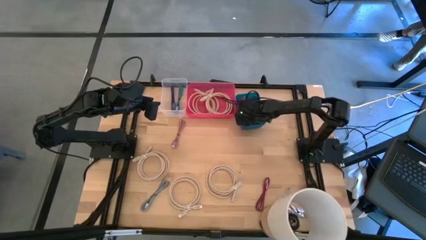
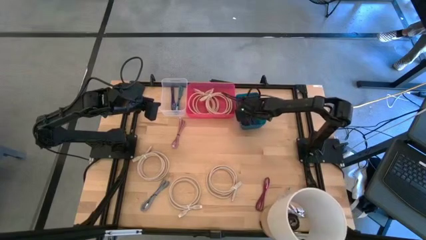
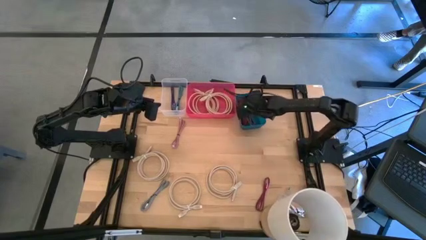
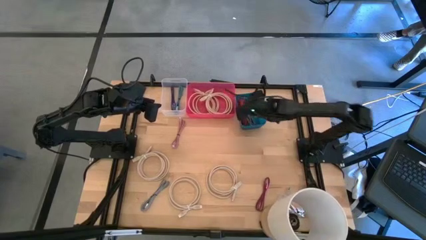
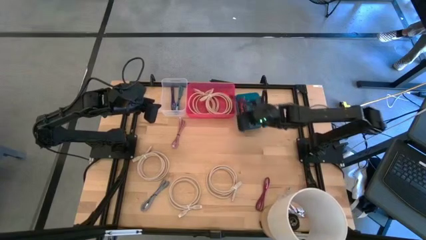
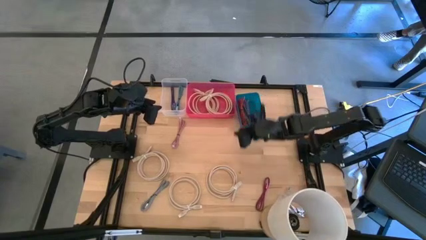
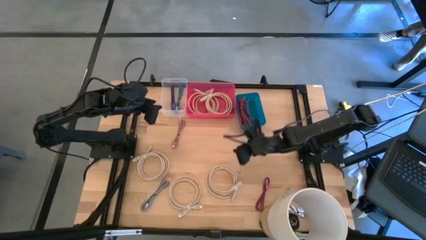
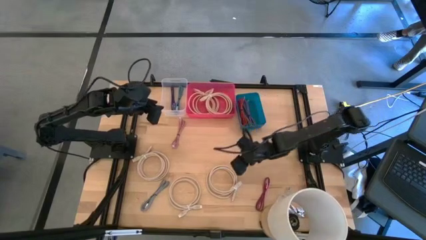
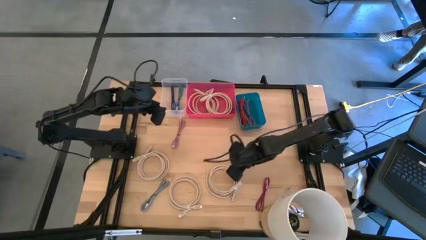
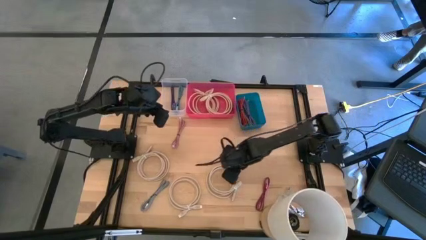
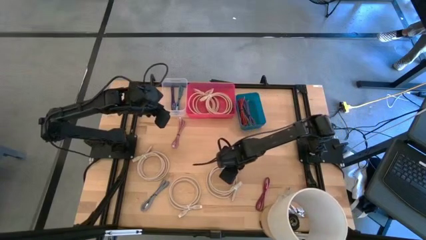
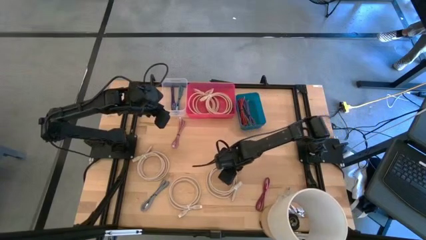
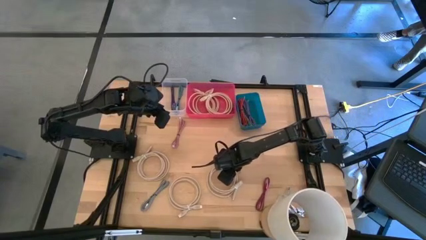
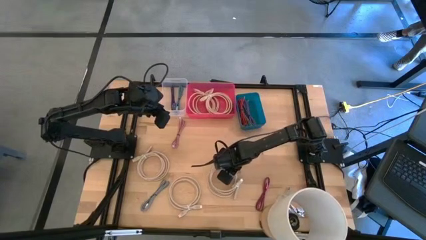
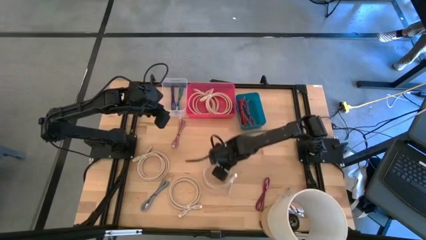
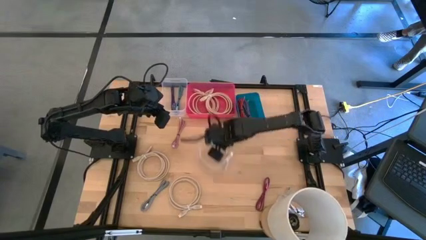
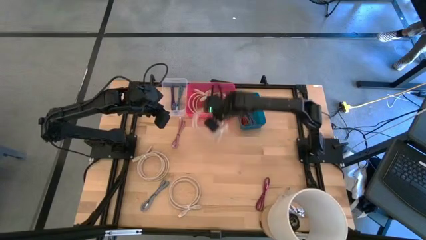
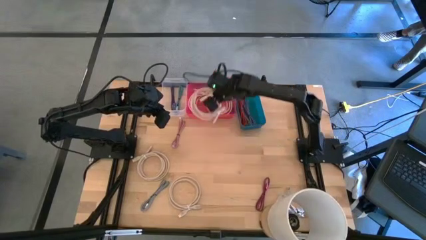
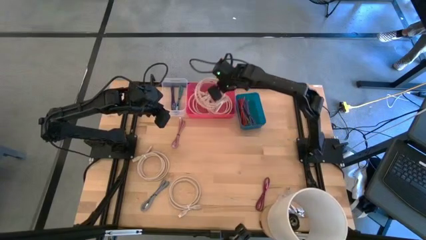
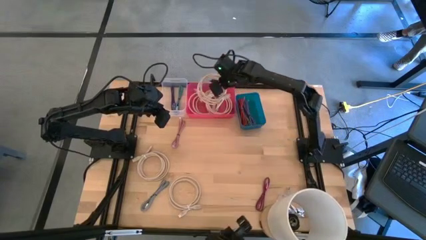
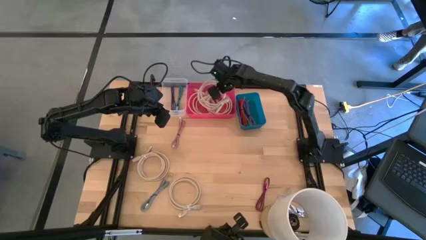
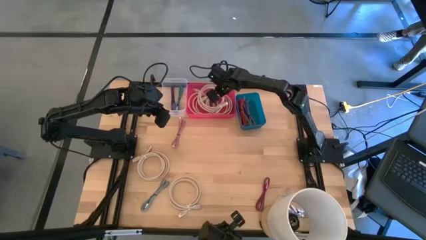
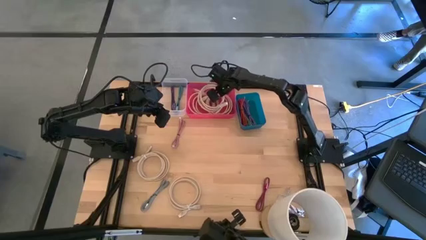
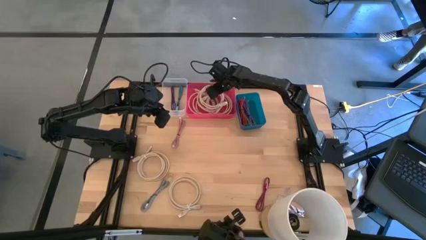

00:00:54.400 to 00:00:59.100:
Task: Pick & Place USB Port
Put the light brown HDMI cable into the pink bin

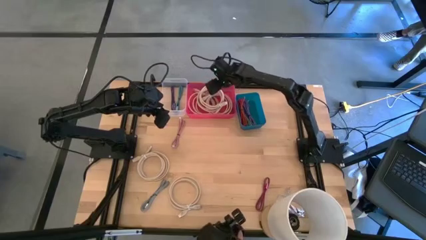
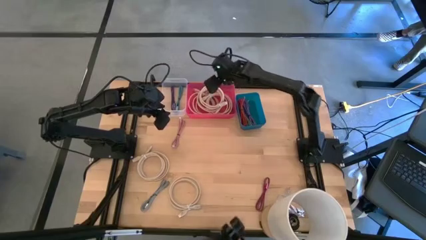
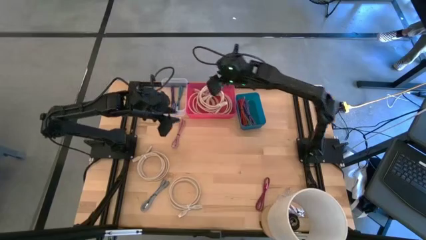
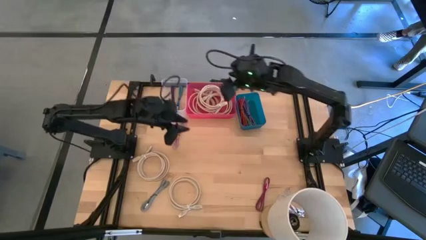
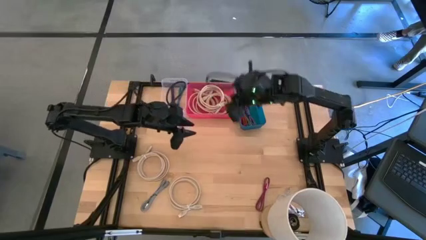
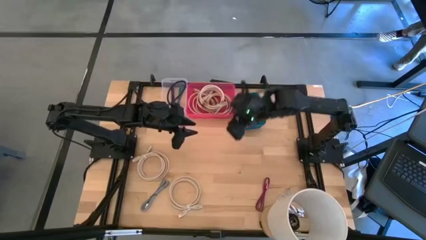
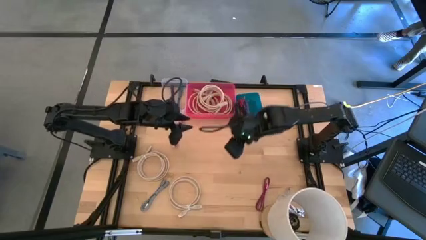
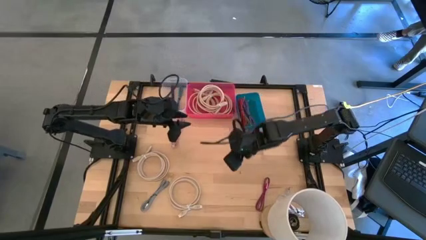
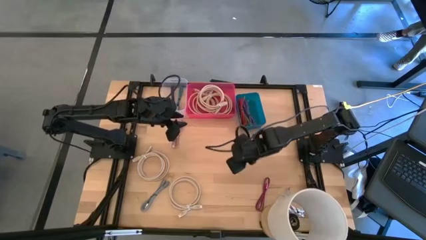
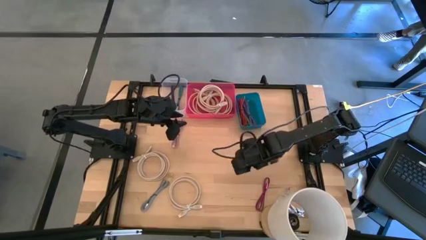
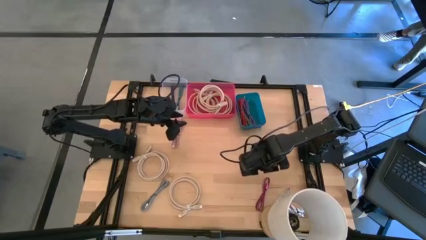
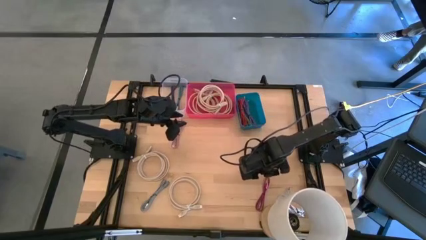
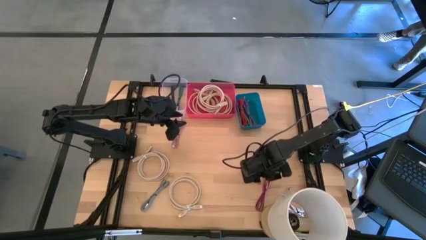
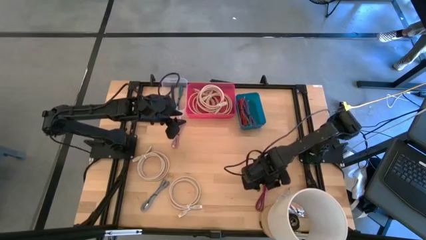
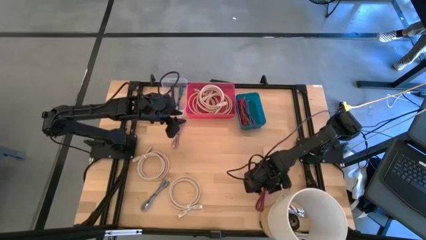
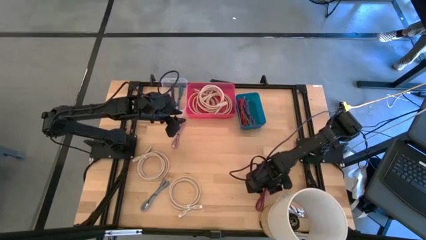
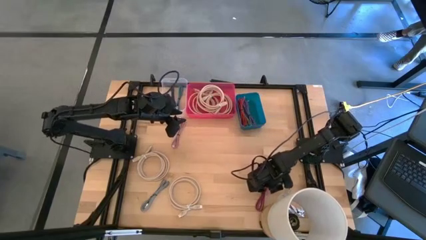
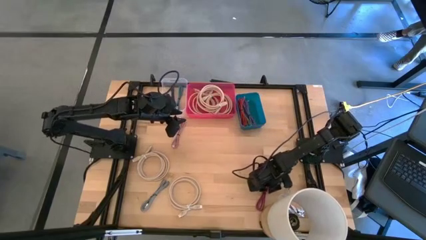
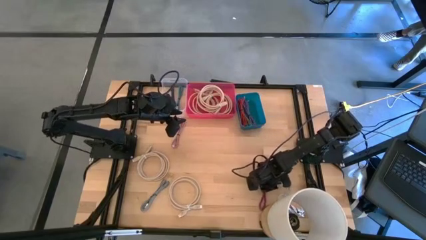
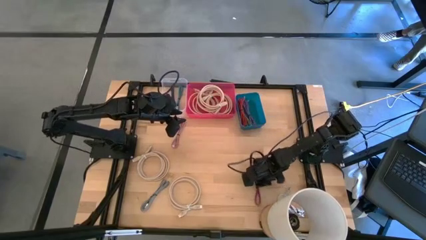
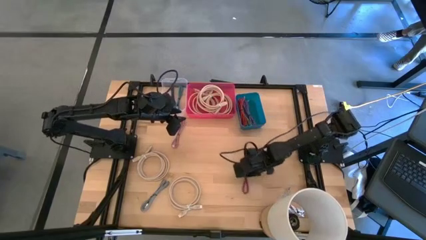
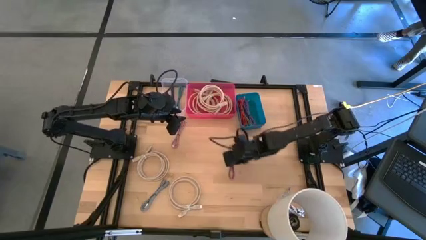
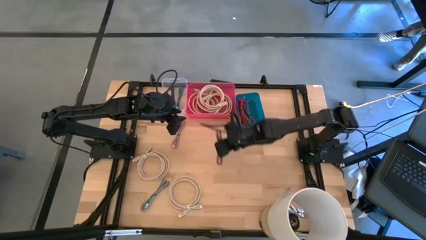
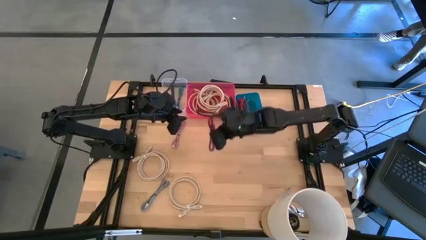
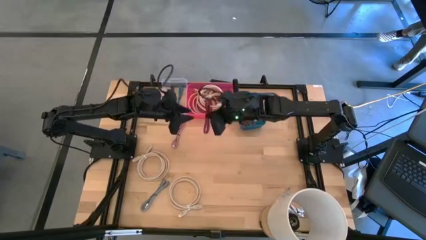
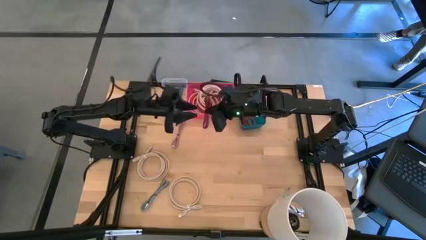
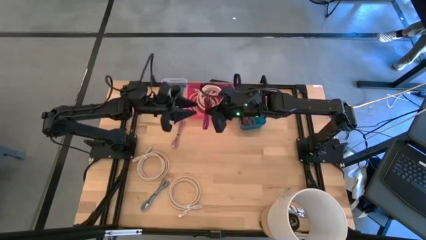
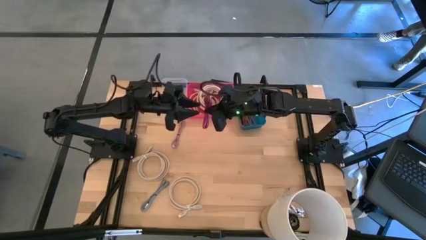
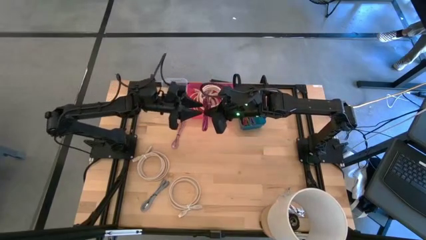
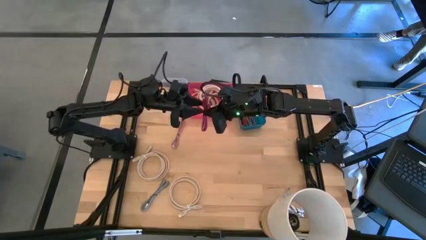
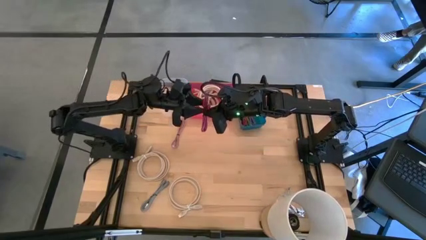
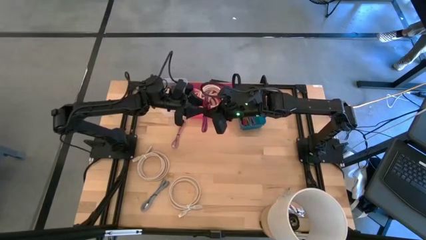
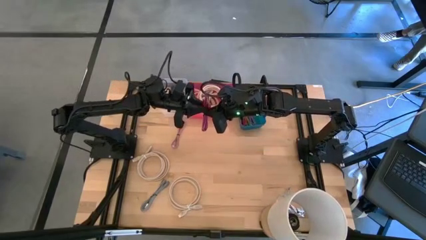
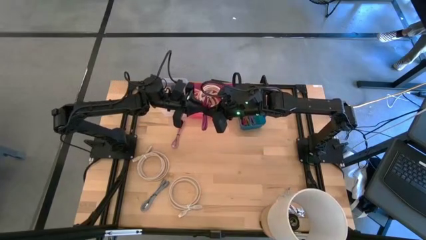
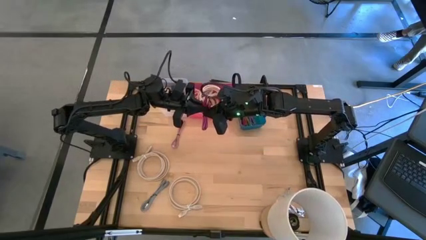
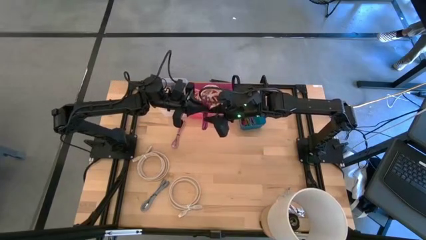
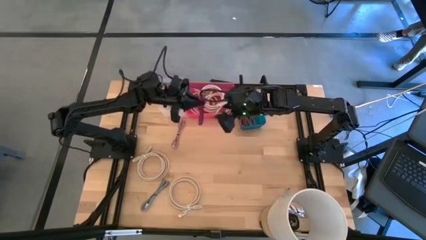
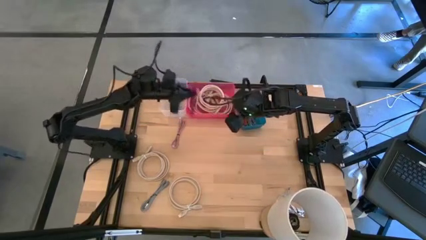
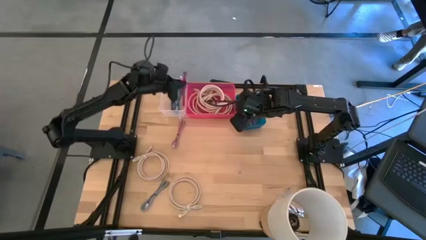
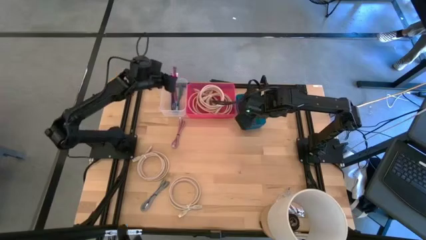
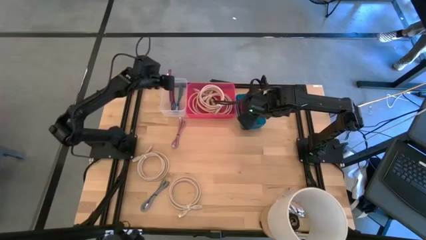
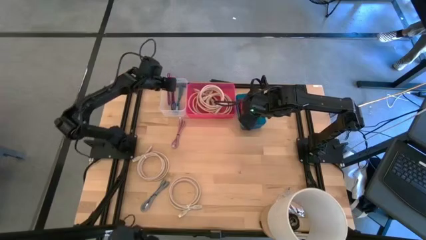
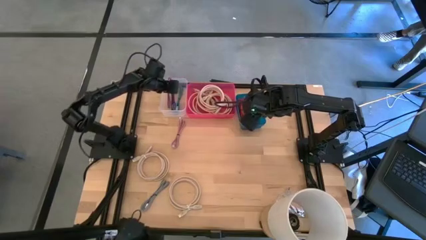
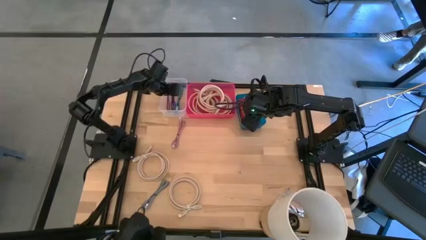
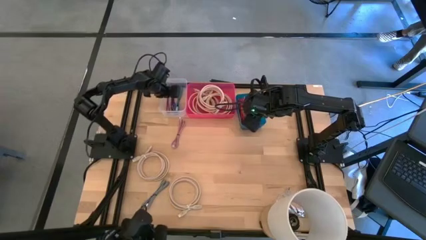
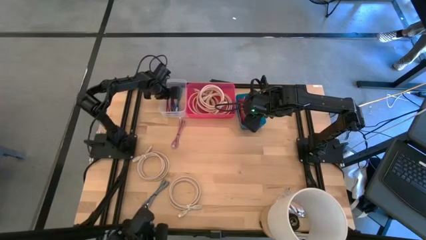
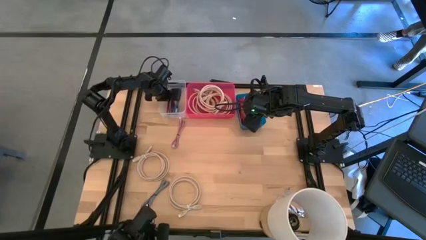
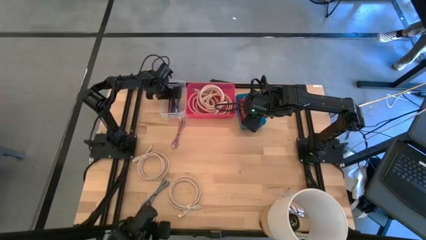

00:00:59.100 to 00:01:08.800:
Put the pink and black charger cable into the transparent bin

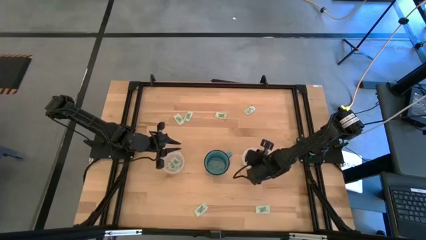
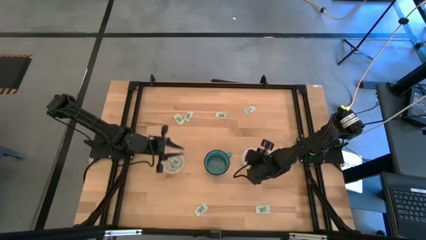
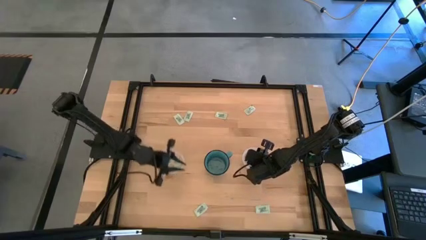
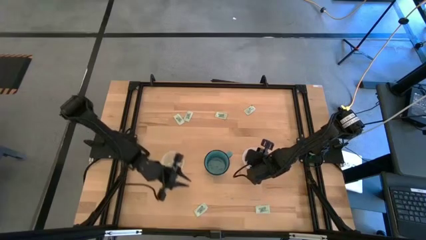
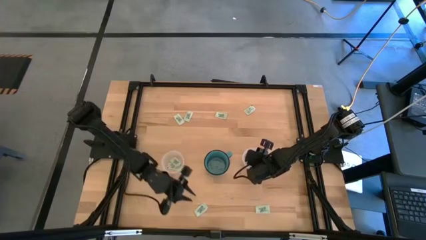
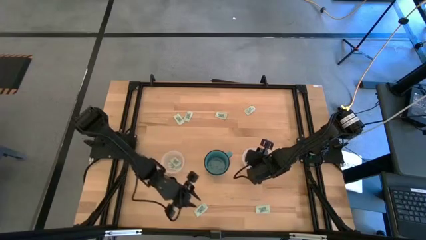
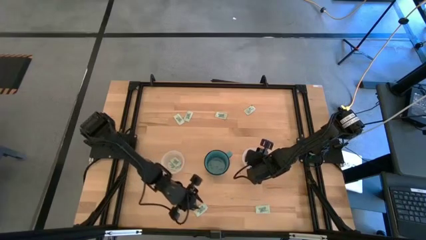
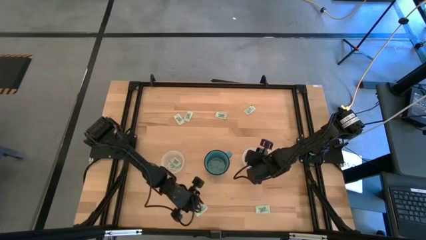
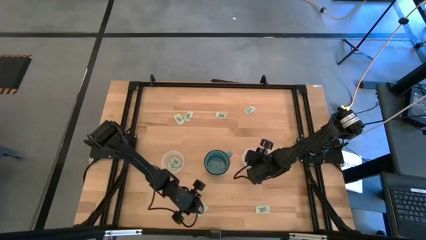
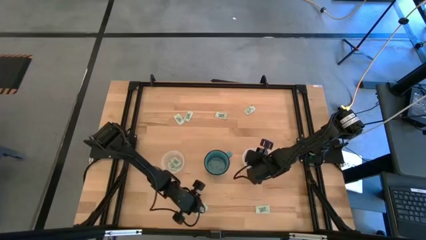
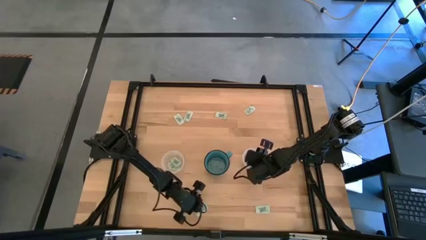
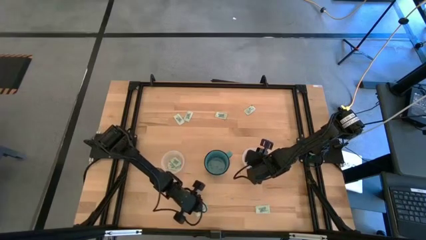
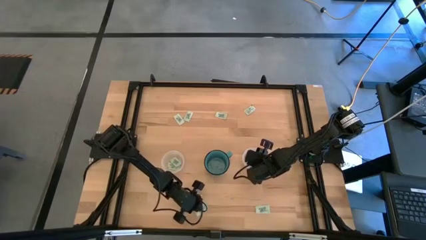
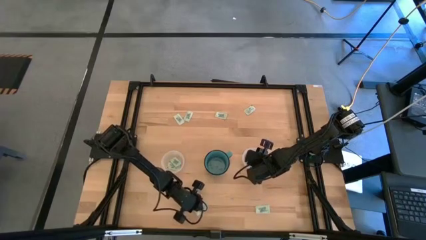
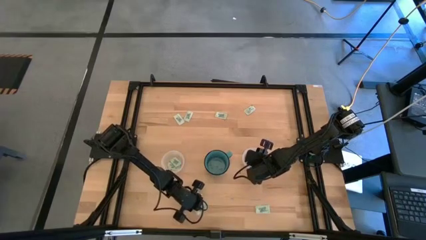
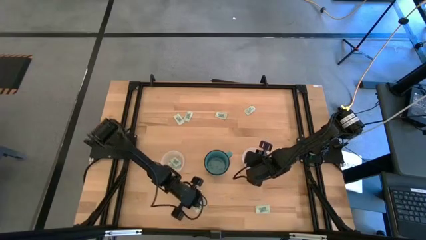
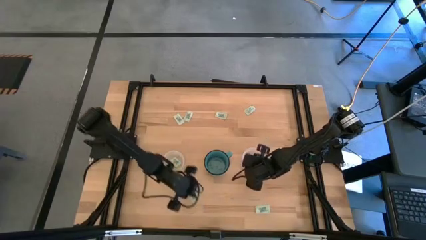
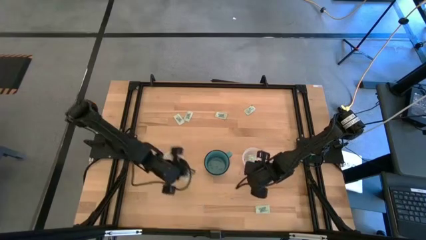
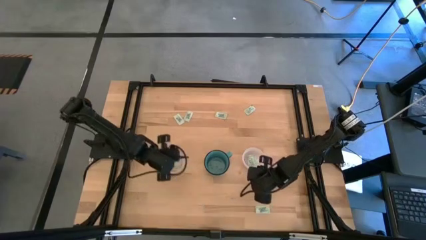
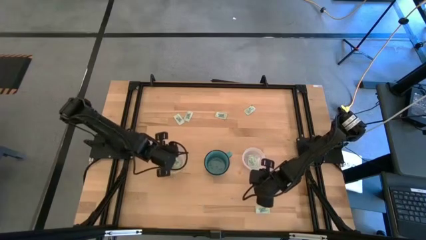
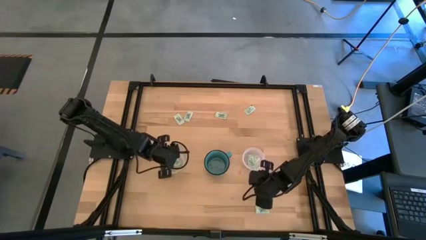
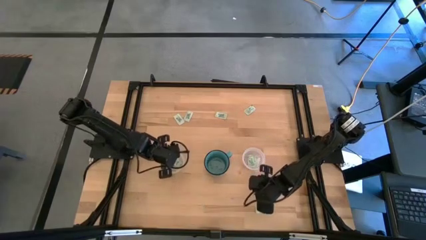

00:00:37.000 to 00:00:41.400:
Task: Pick and place Stevia / Truvia into bins
Put the green stevia packet into the left transparent container
